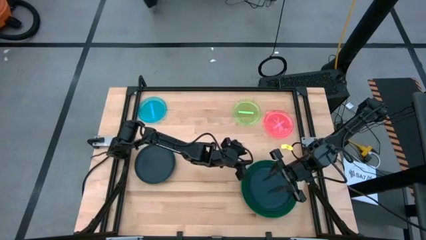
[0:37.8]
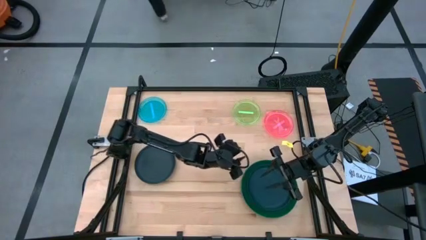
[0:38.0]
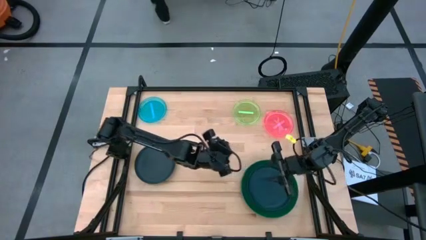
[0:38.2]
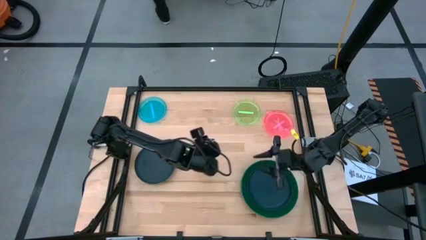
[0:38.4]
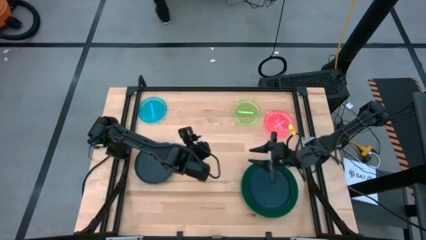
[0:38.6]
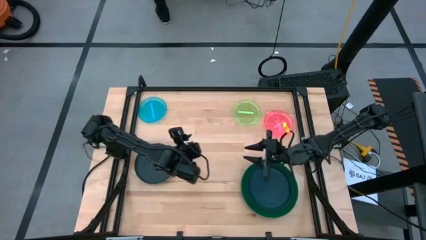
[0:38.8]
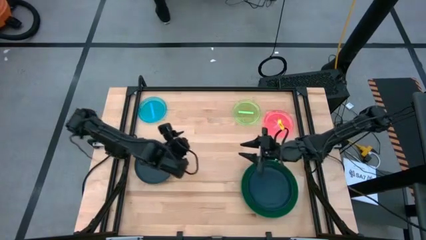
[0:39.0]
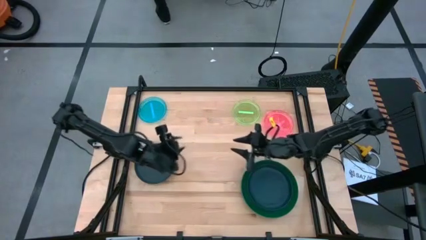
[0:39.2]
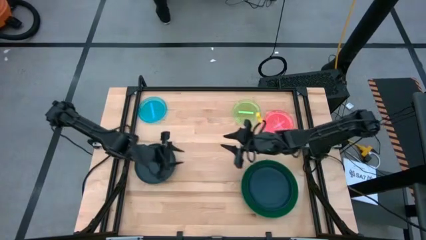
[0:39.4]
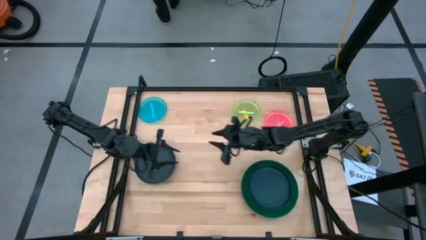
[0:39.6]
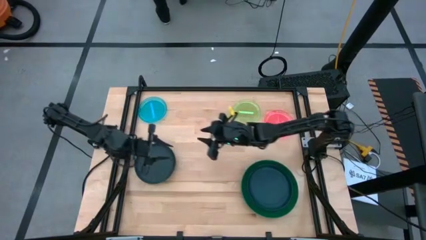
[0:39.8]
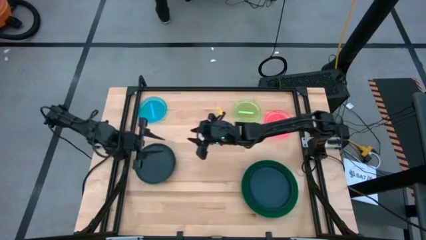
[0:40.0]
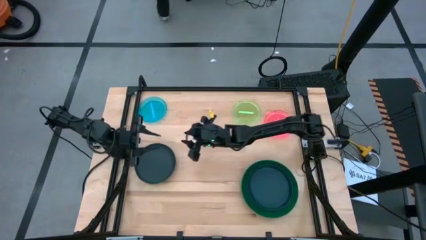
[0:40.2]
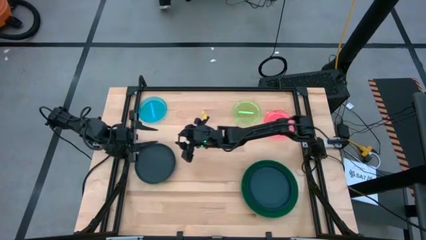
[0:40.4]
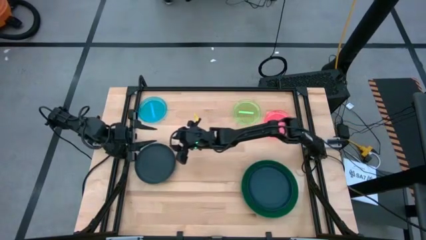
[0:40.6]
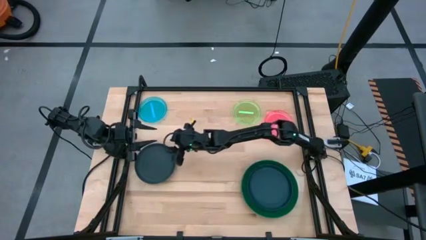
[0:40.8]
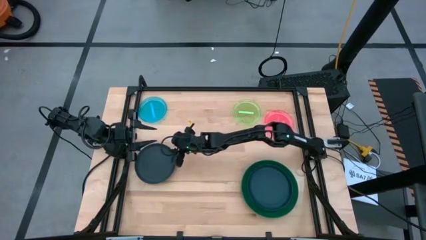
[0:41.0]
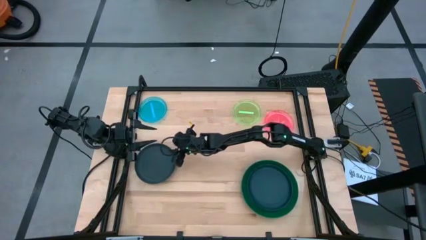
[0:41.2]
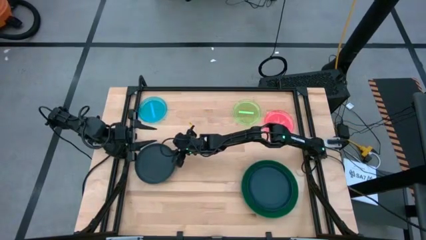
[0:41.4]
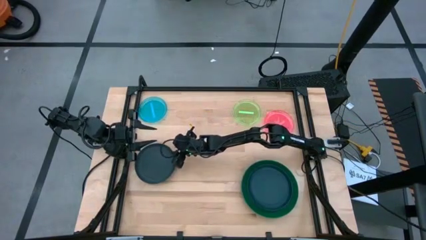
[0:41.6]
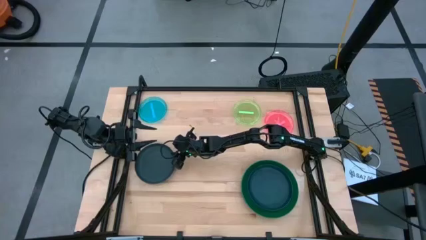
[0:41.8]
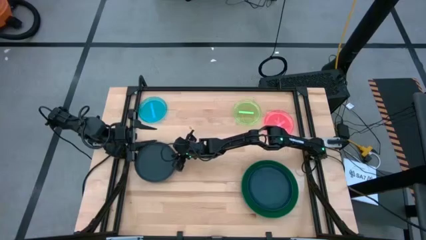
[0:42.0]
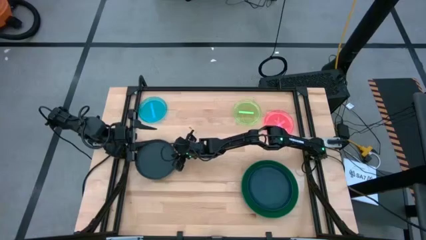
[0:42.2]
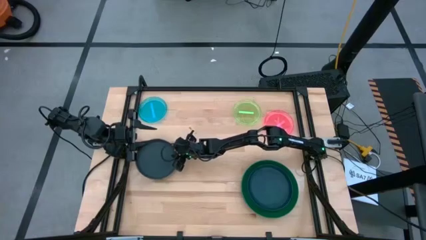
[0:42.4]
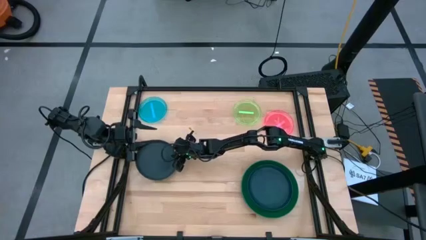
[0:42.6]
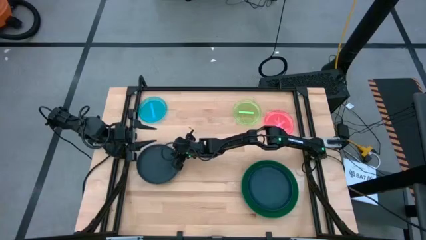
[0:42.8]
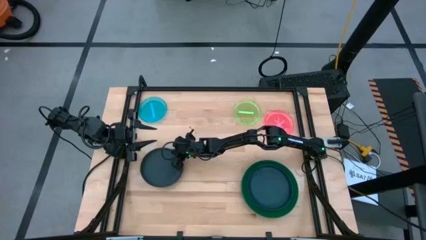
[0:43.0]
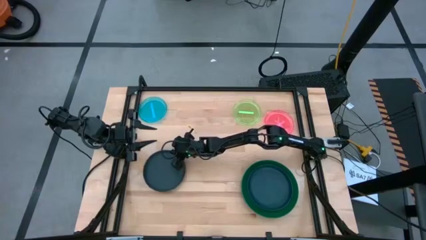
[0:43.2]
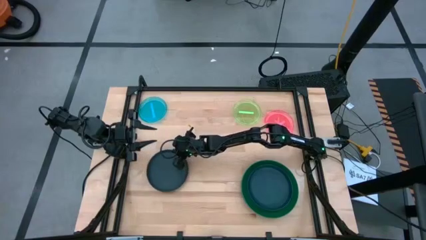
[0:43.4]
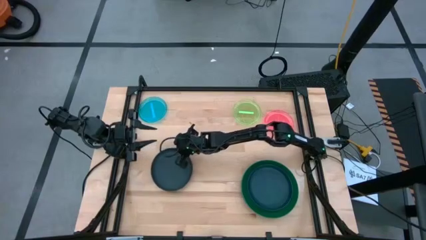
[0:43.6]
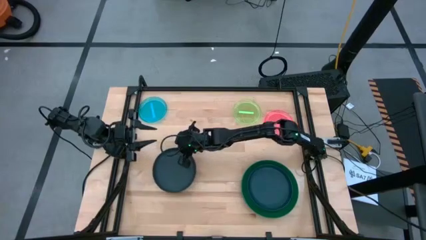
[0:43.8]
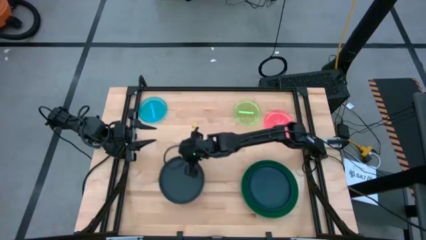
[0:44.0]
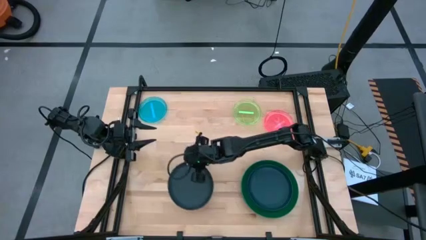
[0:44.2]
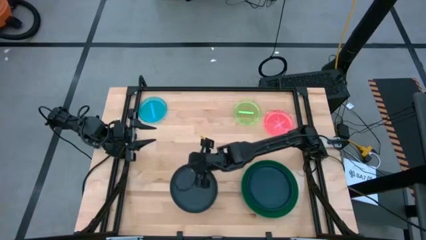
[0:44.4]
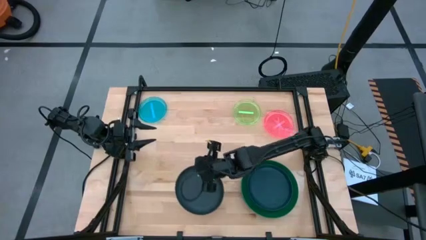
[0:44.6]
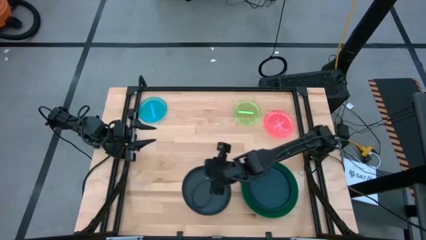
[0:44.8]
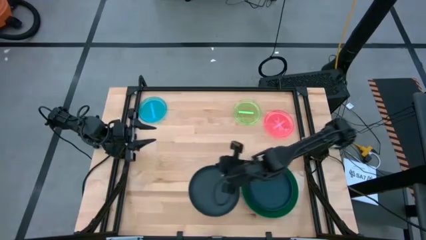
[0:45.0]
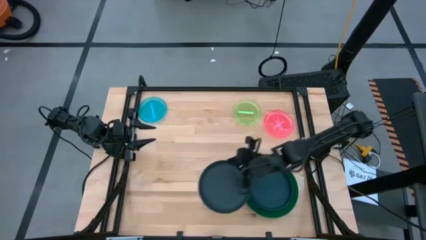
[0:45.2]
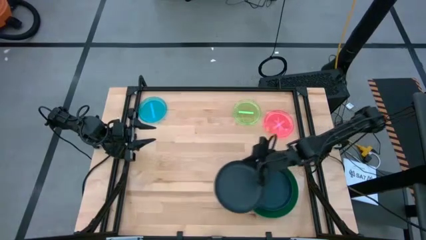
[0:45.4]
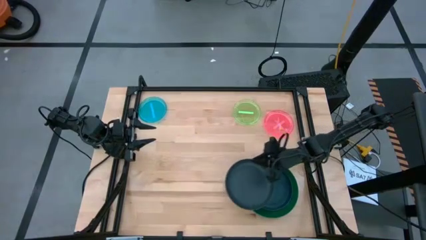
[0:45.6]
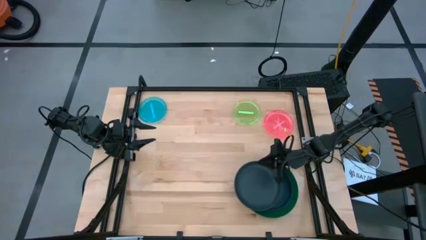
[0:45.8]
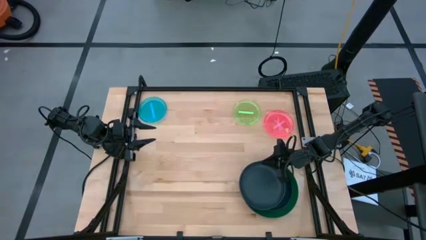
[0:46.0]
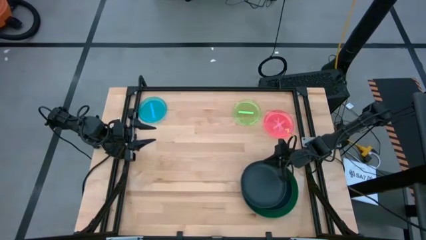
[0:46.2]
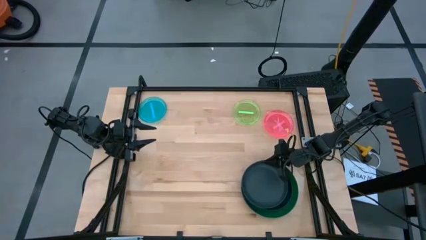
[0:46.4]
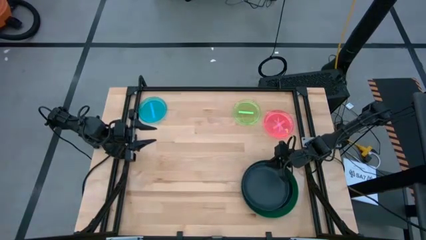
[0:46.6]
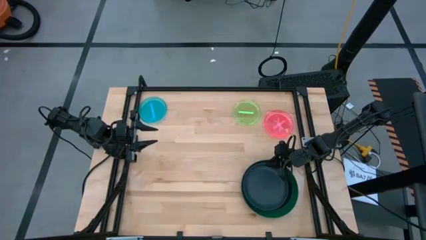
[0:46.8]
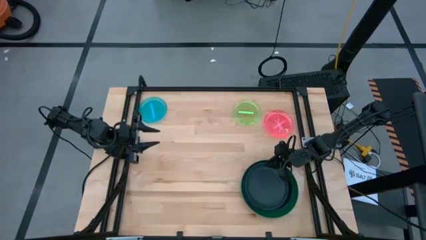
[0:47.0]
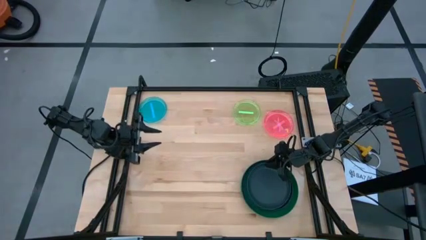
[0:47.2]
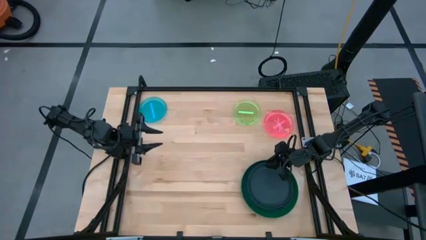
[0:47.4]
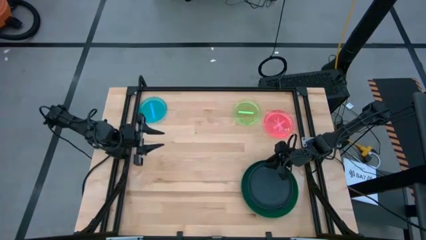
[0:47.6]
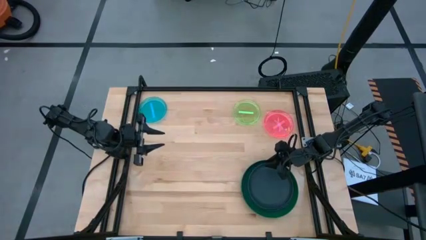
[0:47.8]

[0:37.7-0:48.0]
Task: Stack plastic plates
Stack the dark blue plate on top of the dark blue plate

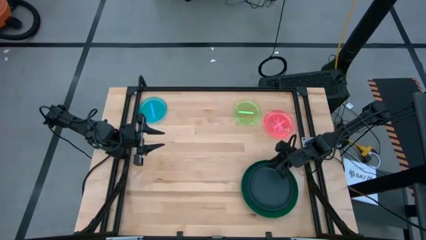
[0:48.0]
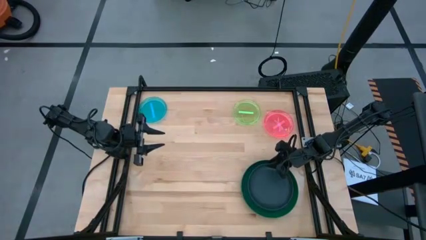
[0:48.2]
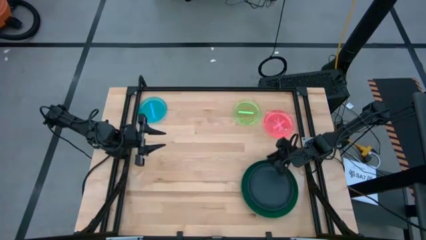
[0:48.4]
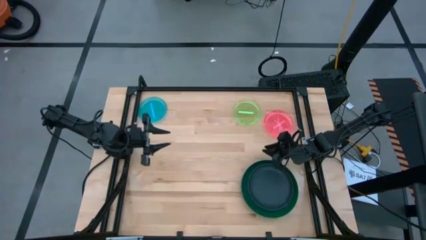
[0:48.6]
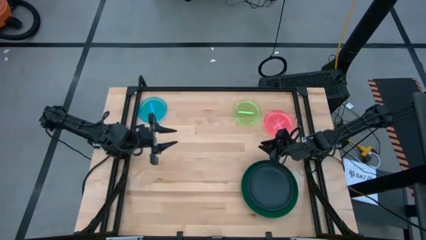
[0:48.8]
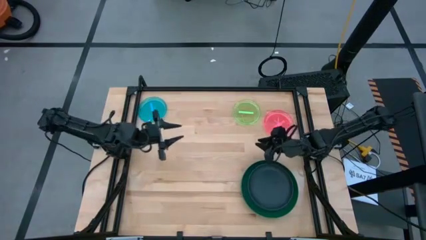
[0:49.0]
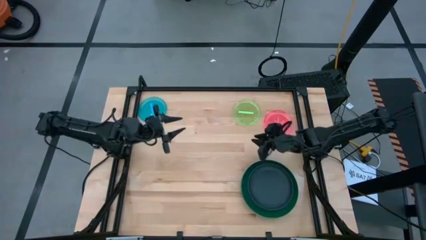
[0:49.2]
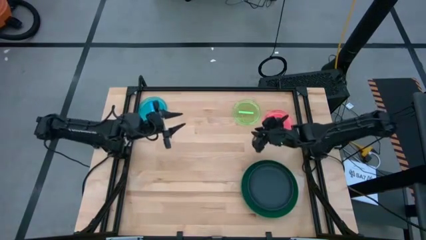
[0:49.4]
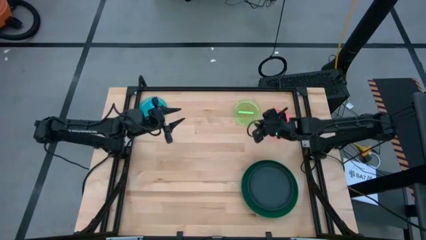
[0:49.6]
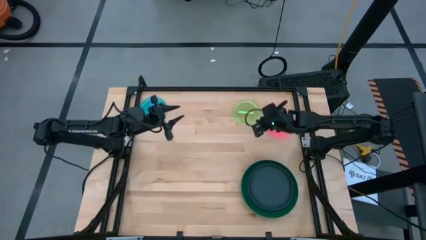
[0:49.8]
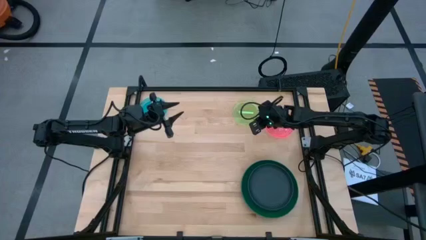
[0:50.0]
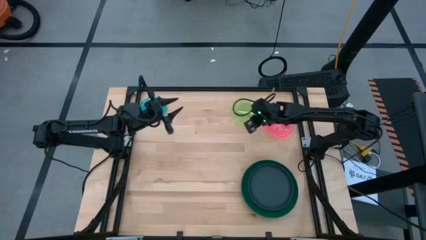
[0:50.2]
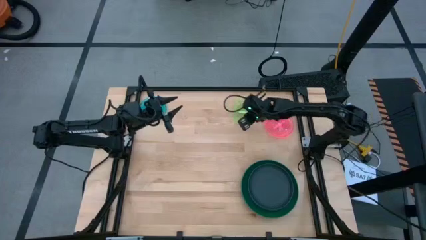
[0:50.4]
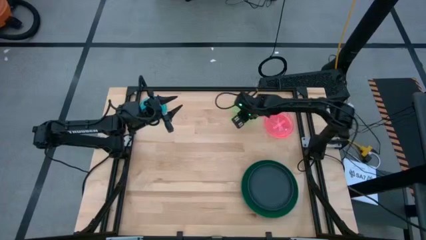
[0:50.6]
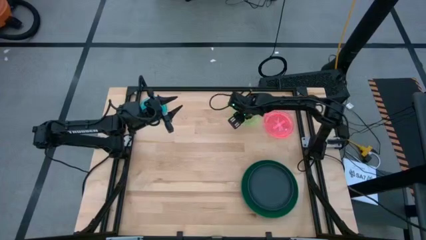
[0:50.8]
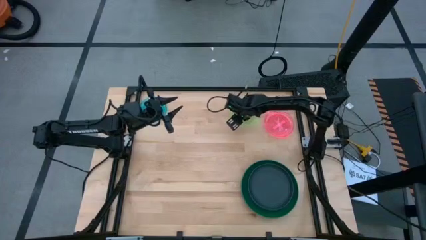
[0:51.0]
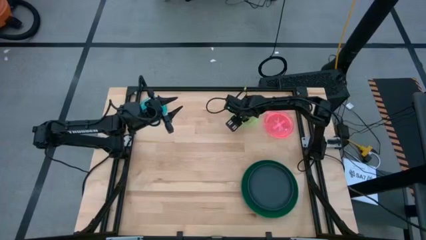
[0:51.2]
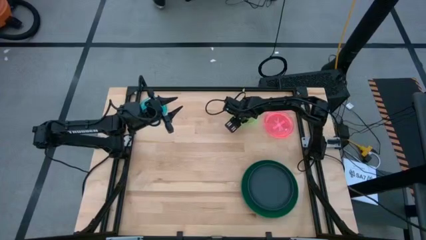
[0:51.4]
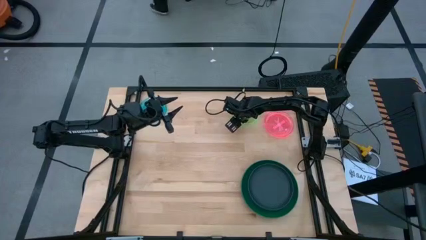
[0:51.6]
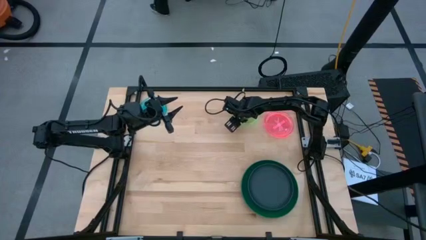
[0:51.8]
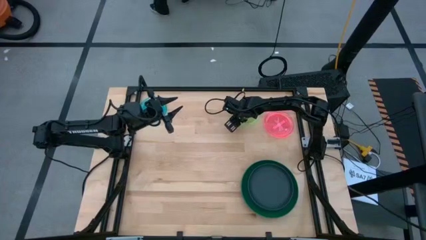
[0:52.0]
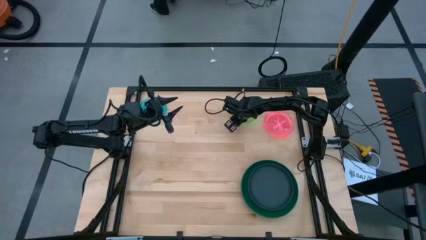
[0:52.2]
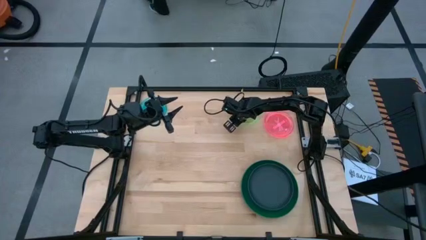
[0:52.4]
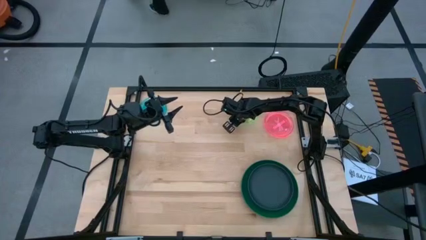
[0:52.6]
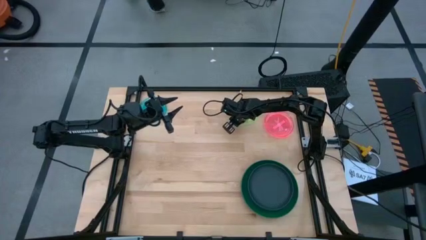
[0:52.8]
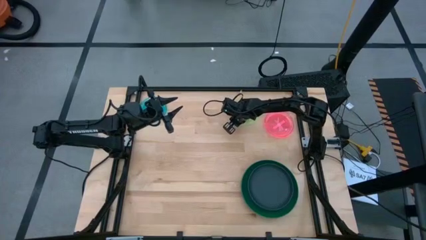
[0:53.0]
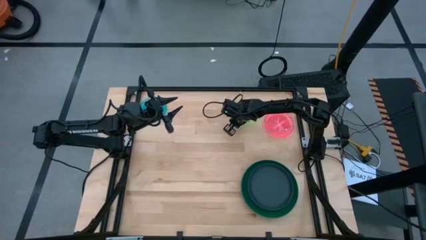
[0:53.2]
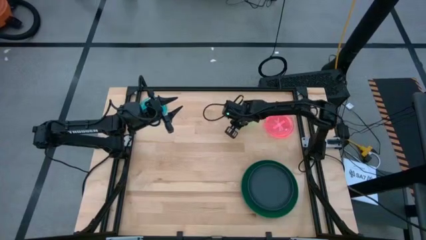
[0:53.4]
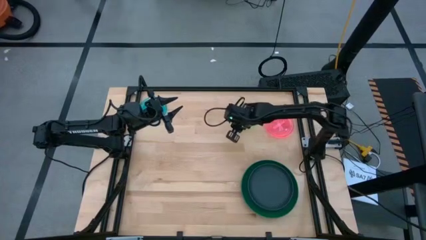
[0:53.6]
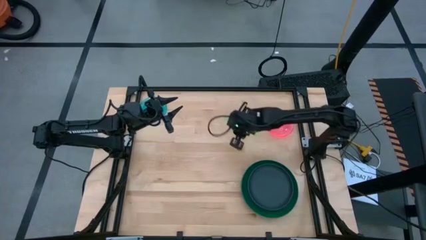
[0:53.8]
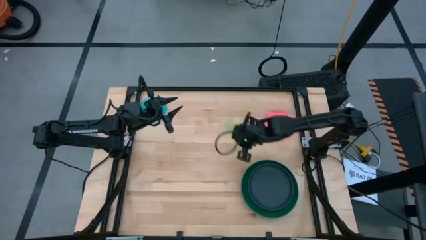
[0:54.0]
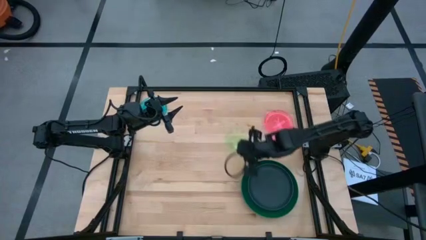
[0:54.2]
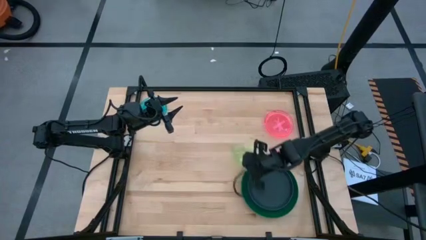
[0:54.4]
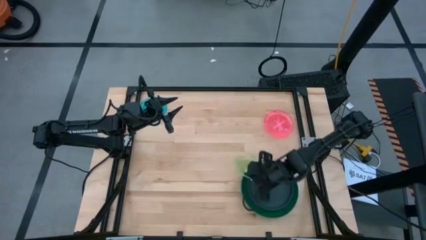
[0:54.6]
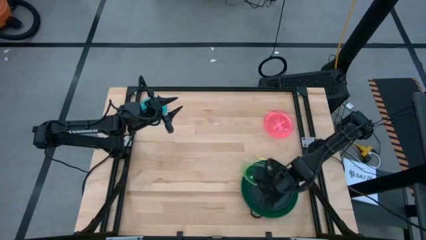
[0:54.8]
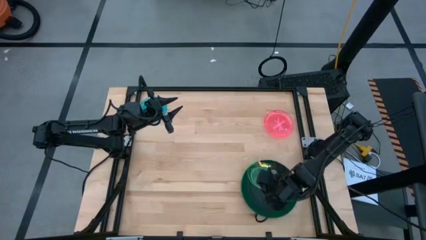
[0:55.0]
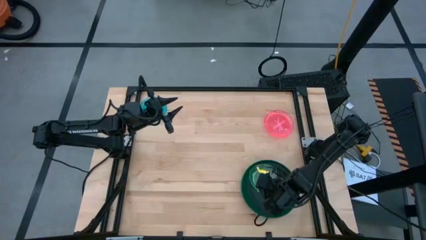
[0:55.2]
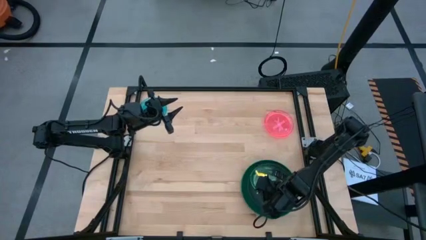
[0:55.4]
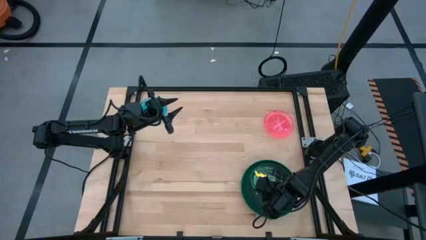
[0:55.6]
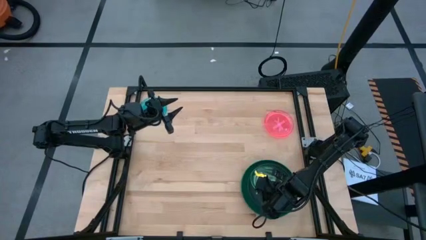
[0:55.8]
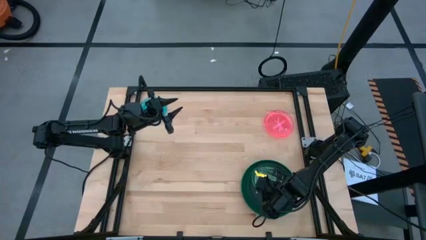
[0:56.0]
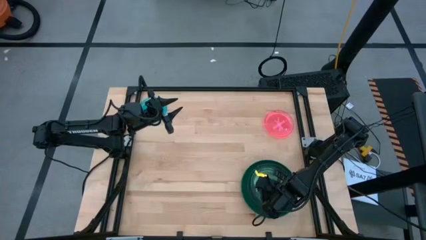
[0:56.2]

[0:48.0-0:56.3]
Stack the light green plate on top of the dark blue plate
